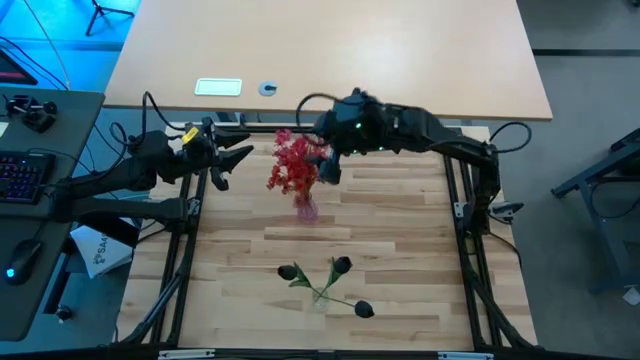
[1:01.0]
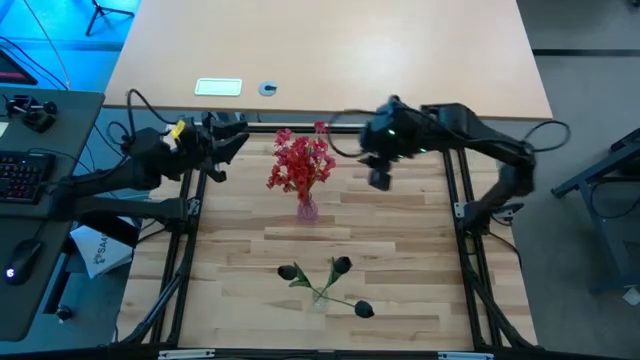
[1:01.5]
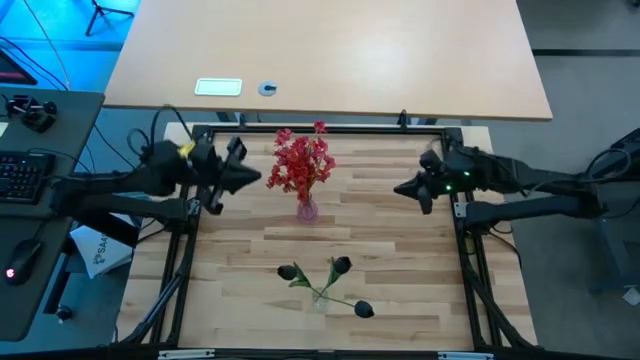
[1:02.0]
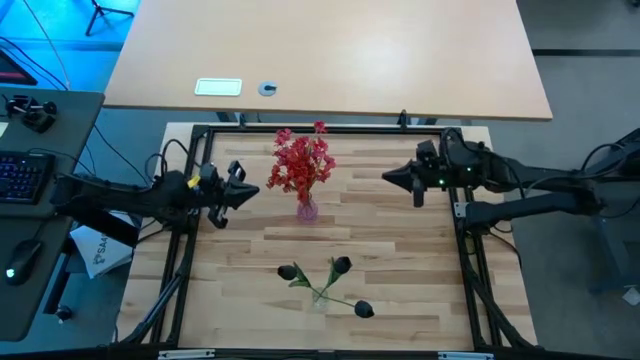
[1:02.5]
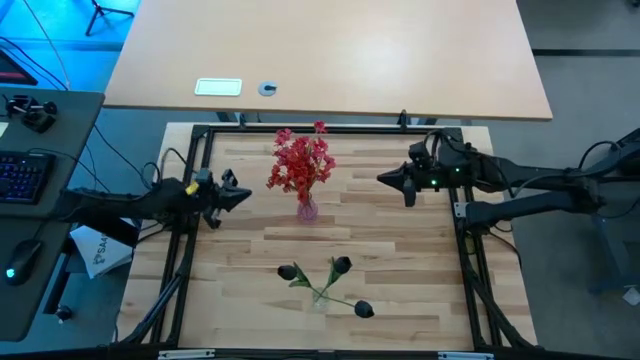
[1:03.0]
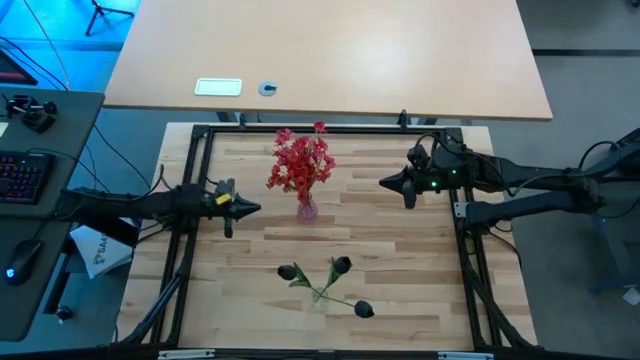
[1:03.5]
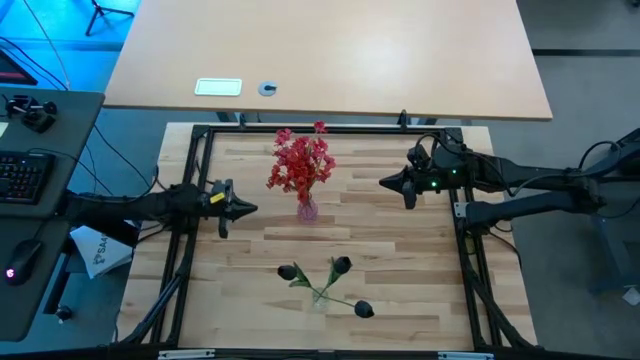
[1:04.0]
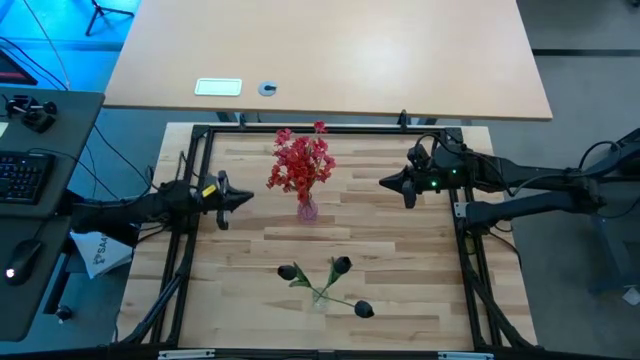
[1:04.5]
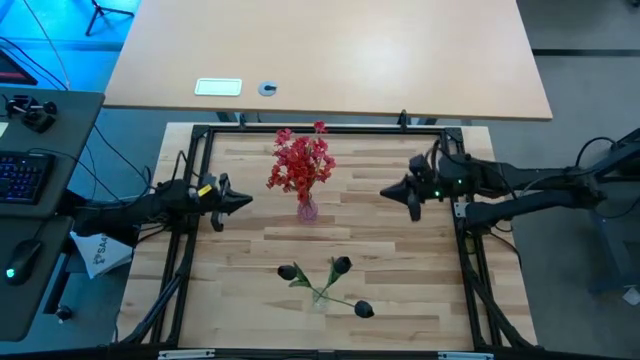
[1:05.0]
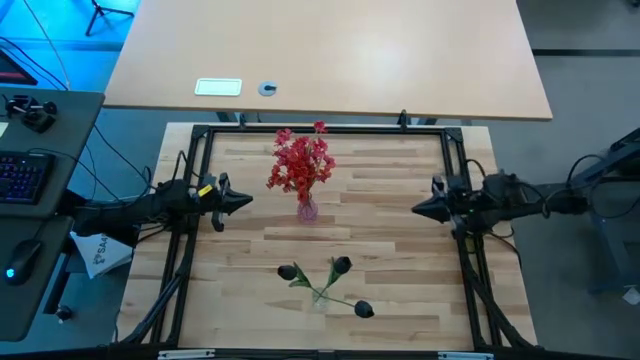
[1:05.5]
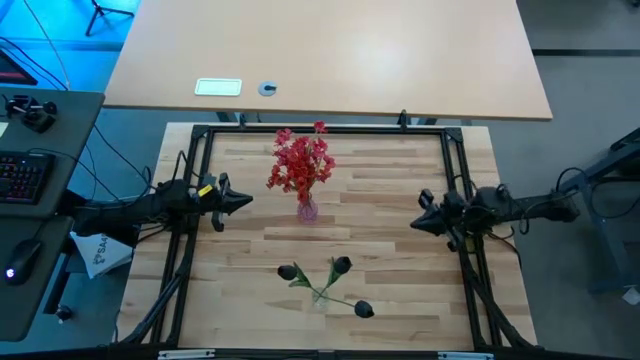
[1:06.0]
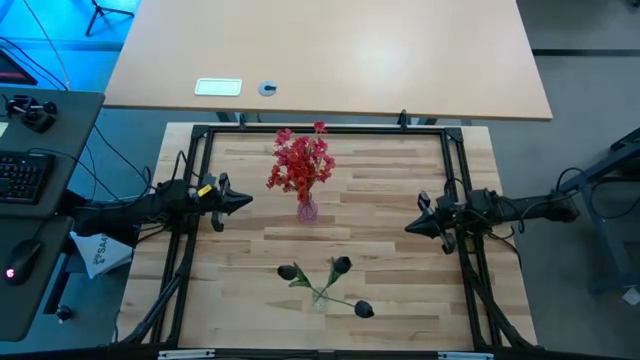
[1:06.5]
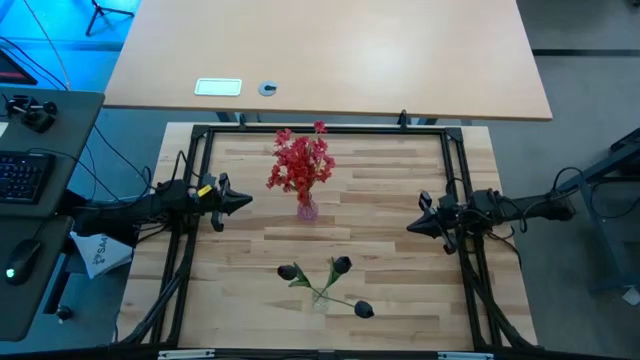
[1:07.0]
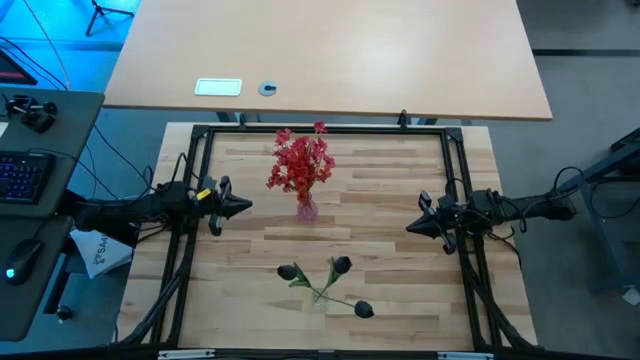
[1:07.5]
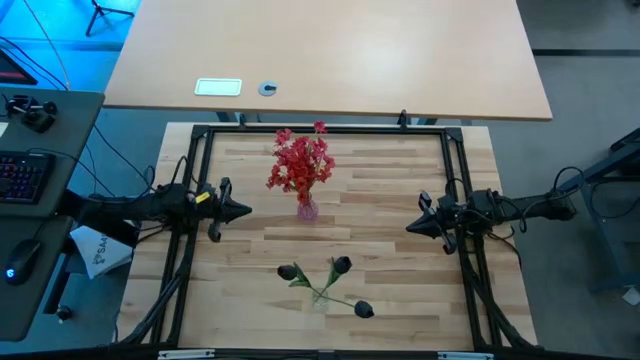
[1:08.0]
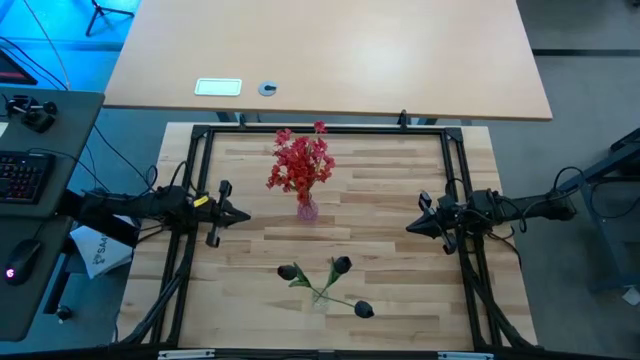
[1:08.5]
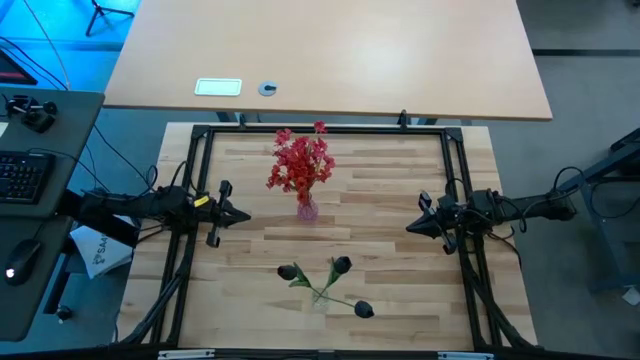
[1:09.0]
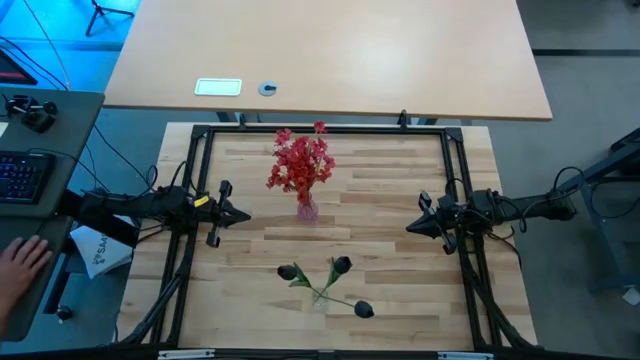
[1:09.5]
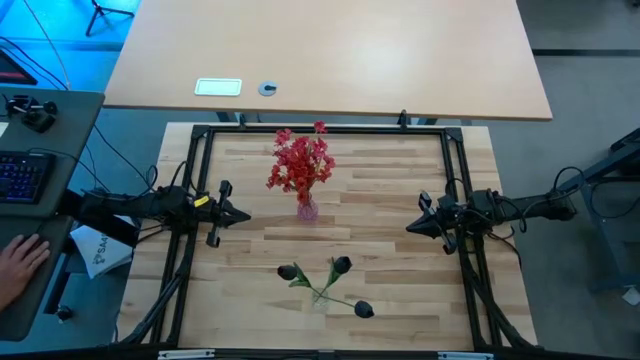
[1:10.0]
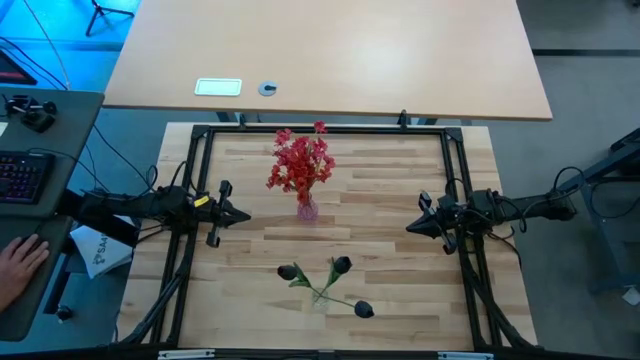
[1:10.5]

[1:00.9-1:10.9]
Task: Sort flowers into vase by color
Return to Home Position

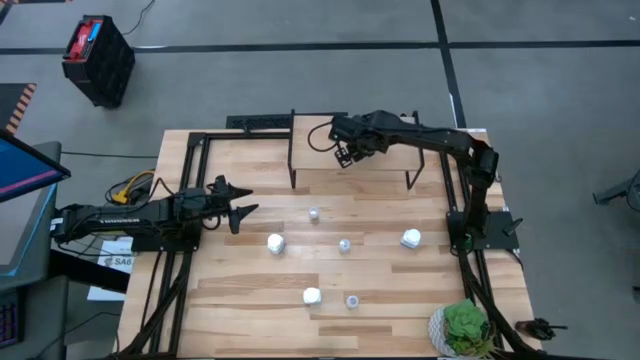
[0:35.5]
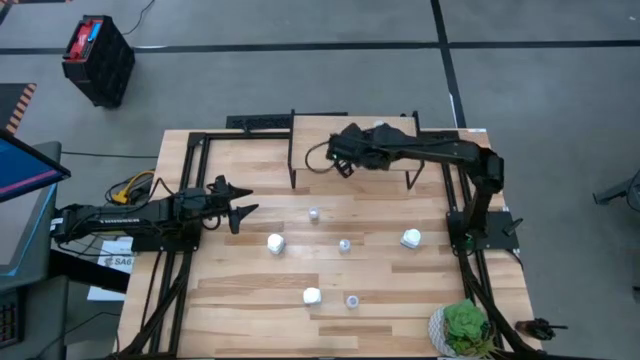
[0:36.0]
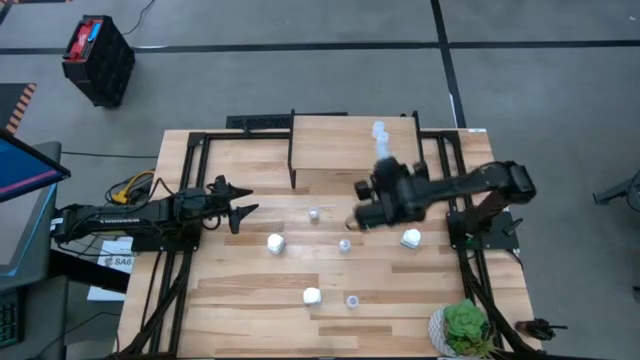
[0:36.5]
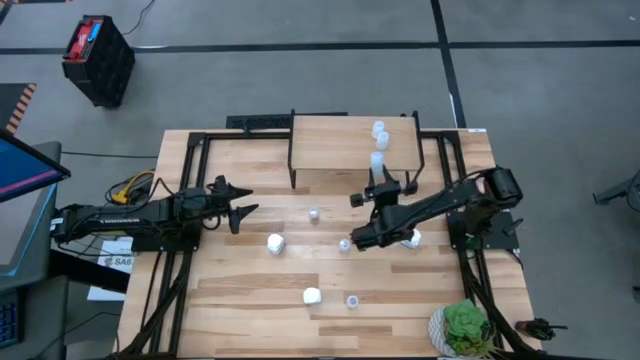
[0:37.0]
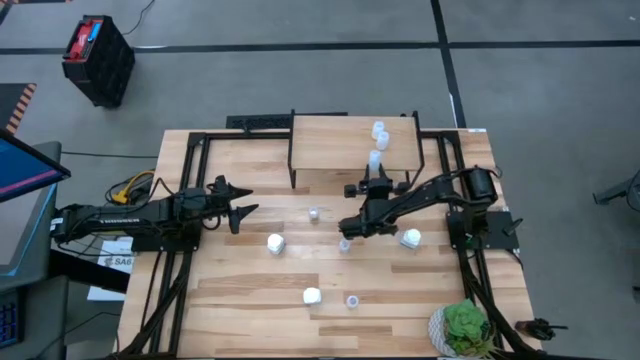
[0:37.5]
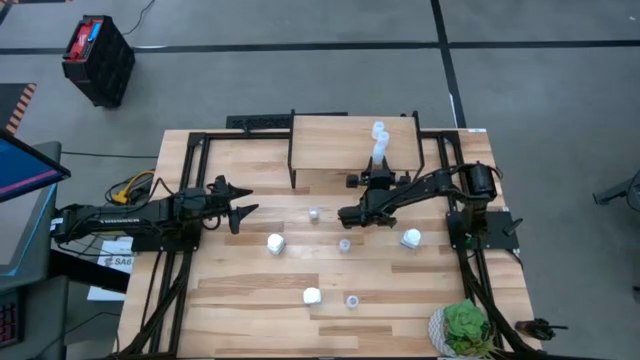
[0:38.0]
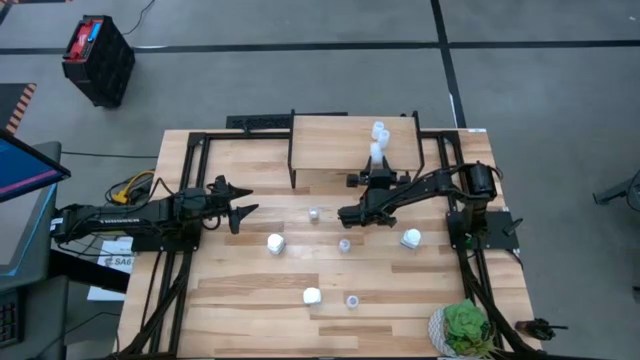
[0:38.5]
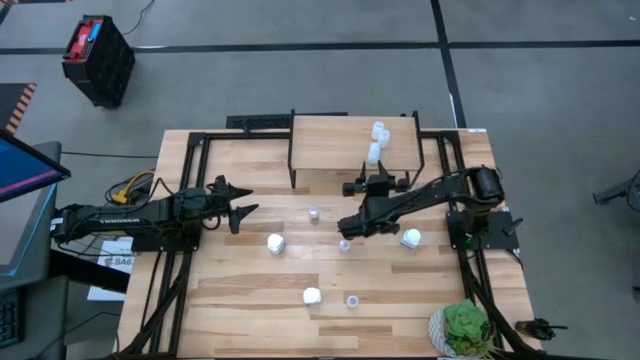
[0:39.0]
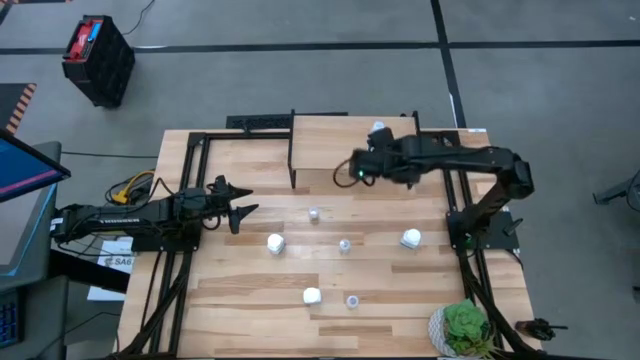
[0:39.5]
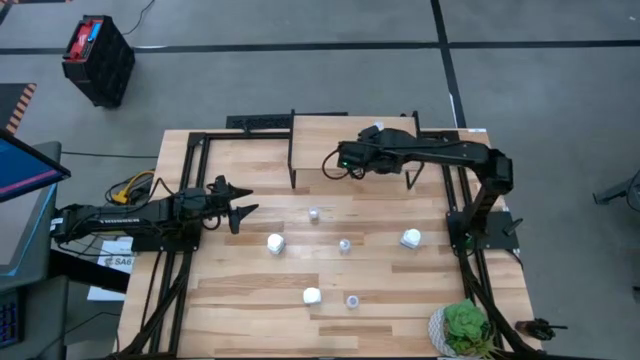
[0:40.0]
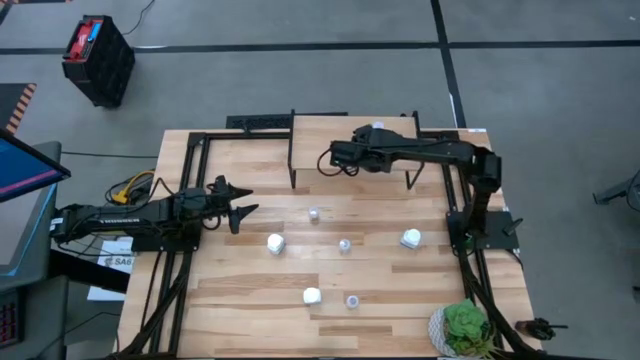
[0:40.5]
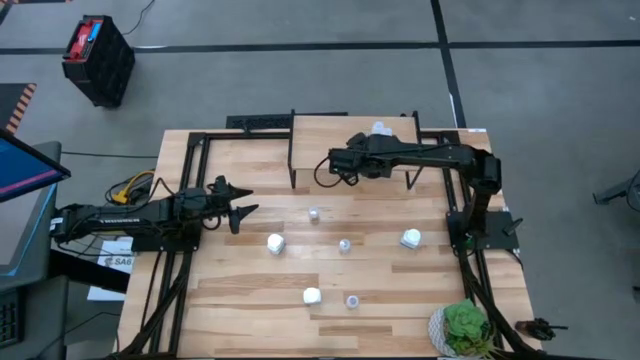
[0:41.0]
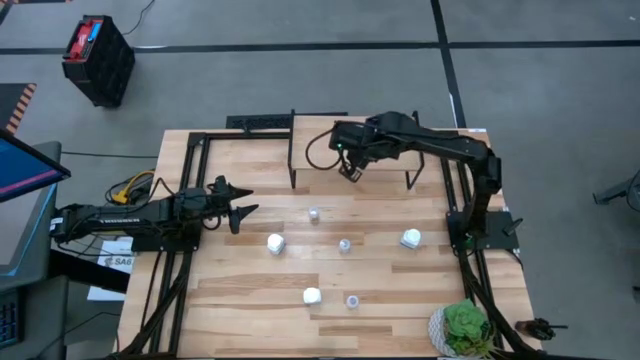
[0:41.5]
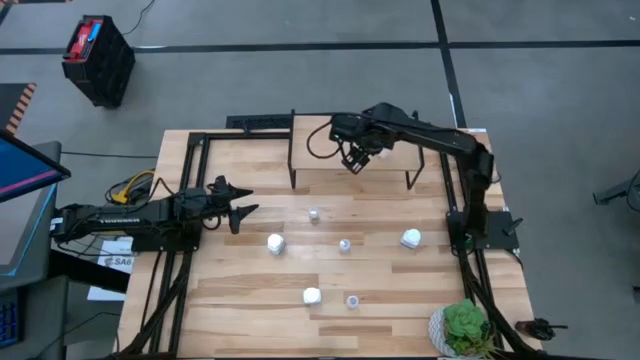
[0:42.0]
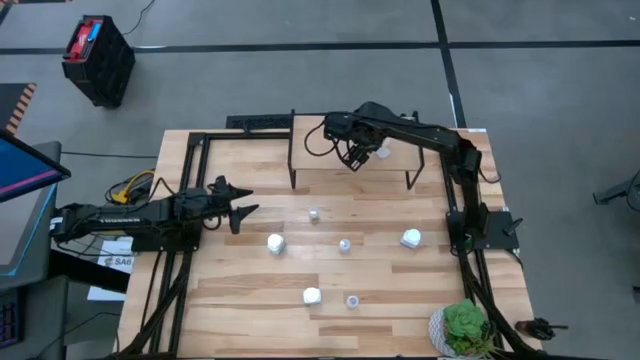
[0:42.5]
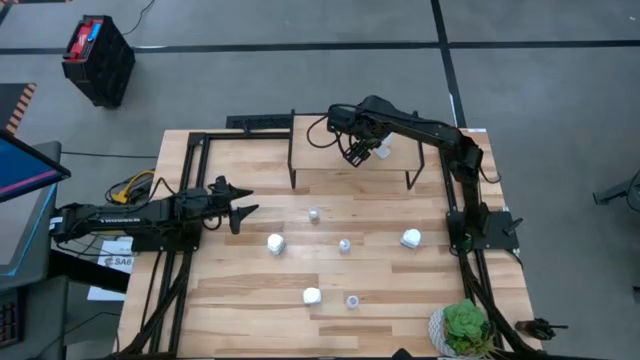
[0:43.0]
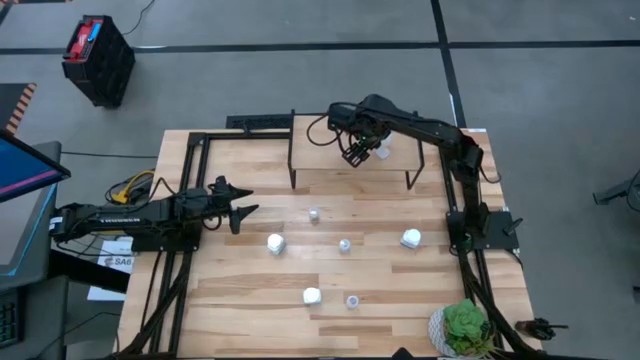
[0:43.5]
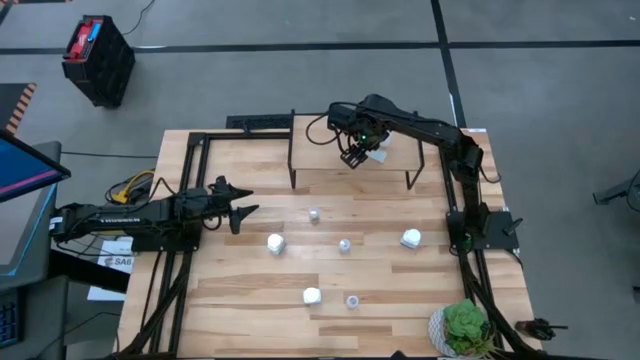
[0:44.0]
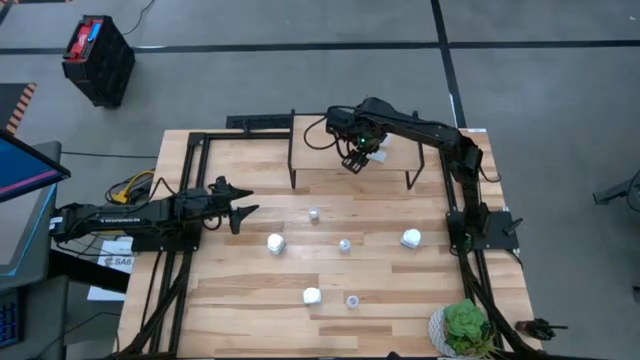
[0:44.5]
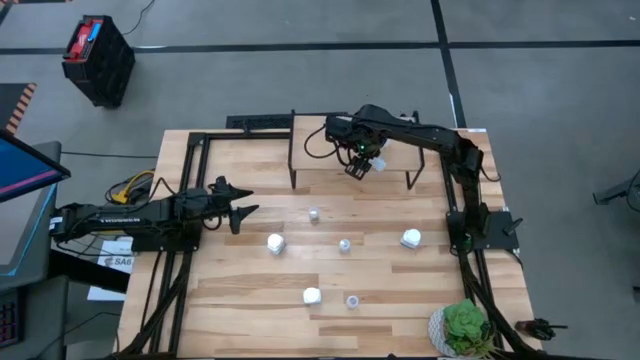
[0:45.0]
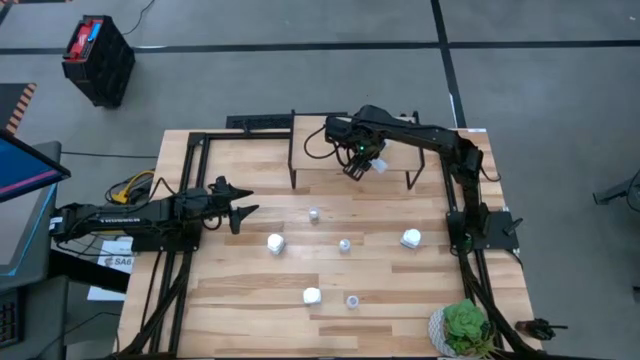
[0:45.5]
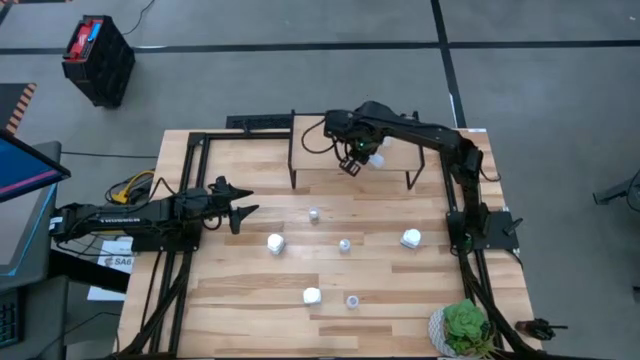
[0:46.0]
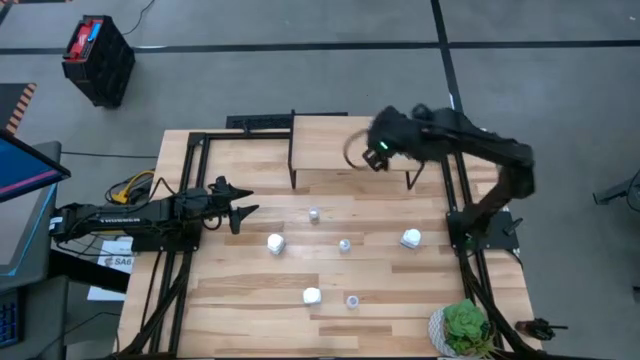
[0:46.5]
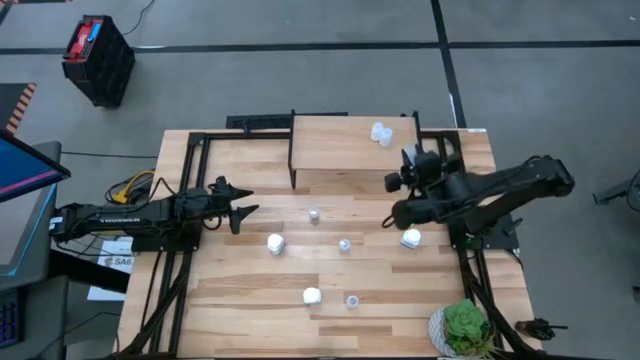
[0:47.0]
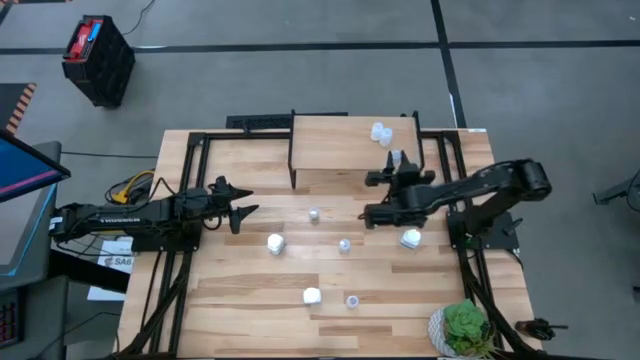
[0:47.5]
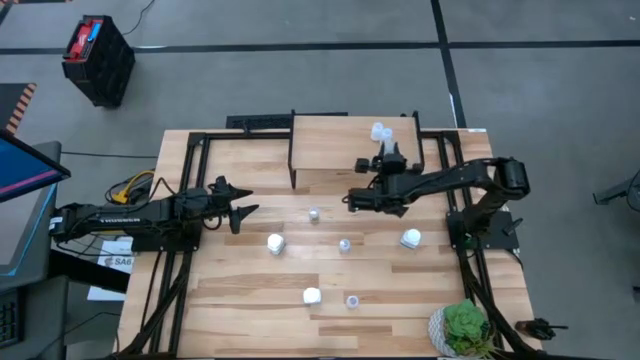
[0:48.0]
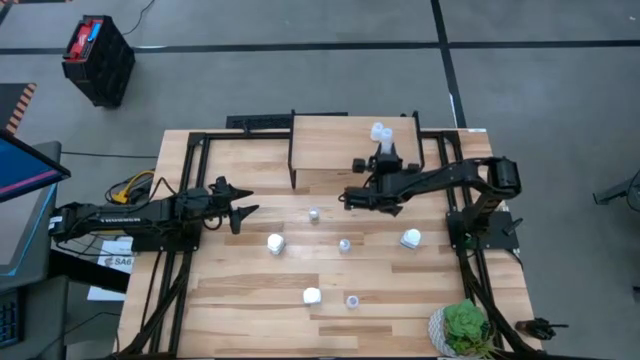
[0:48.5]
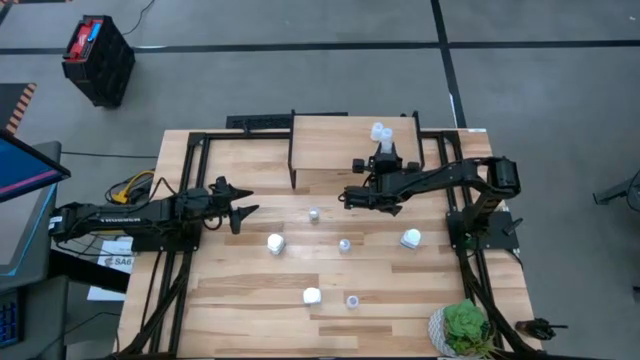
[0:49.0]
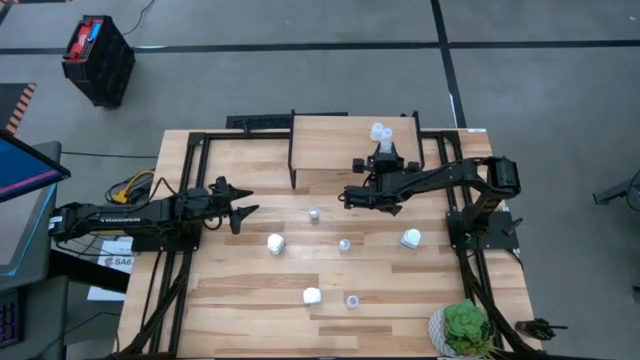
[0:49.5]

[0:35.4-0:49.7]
Task: Pick and place medicine bottles onto shelf by color
Put the white pill bottle on the shelf
